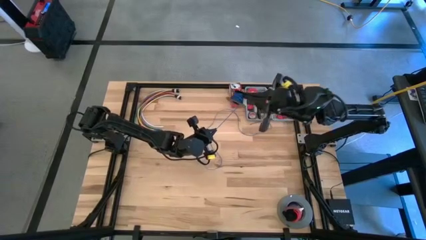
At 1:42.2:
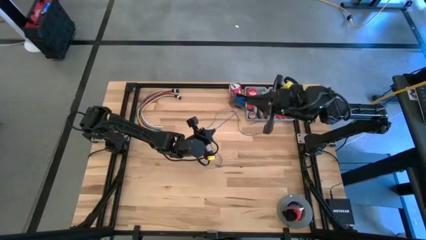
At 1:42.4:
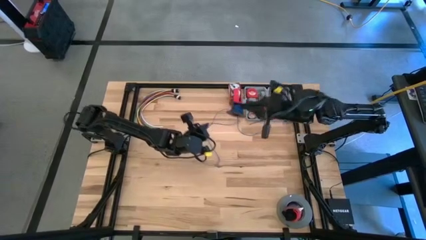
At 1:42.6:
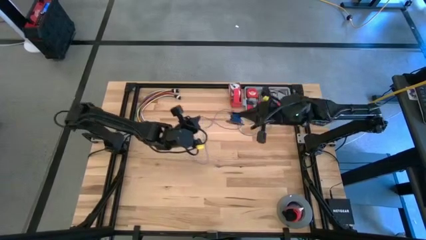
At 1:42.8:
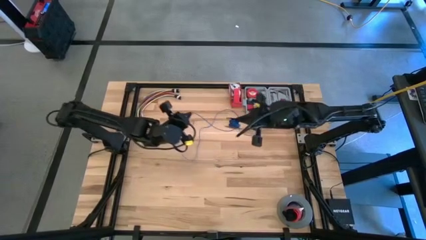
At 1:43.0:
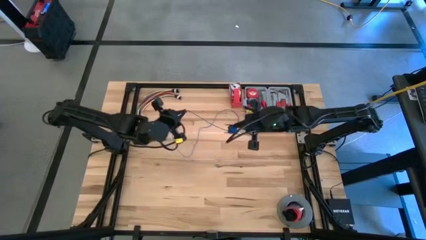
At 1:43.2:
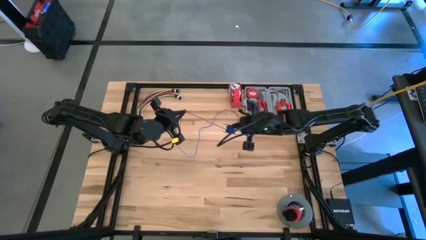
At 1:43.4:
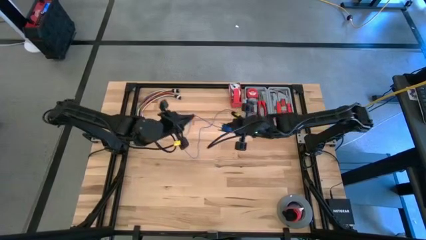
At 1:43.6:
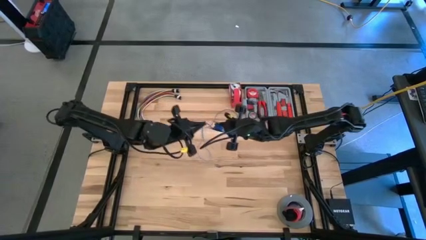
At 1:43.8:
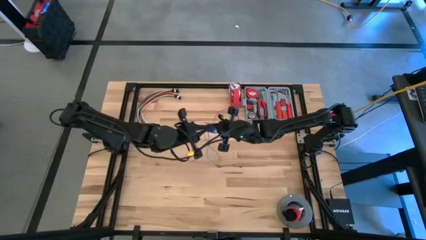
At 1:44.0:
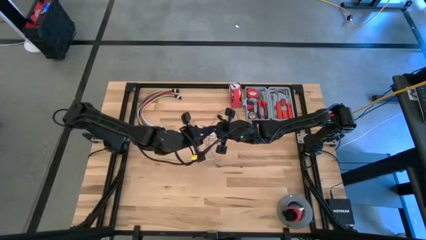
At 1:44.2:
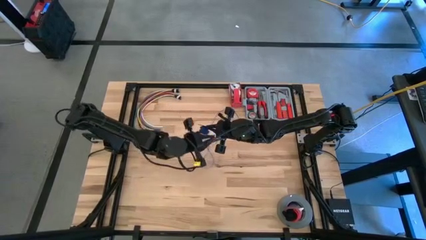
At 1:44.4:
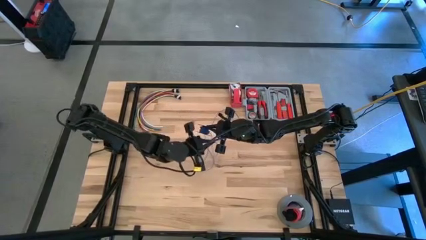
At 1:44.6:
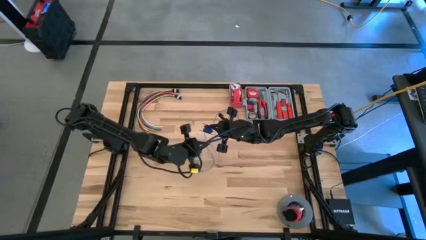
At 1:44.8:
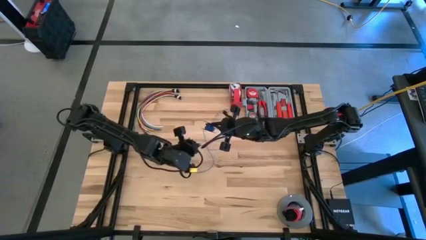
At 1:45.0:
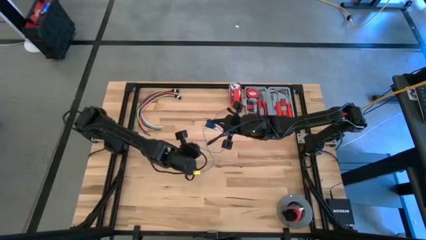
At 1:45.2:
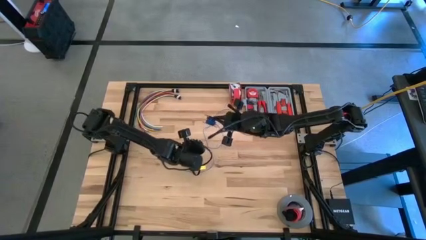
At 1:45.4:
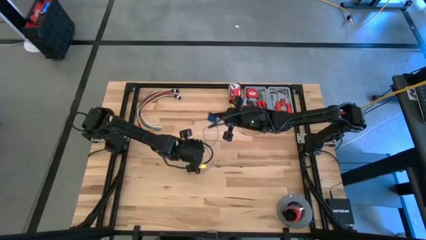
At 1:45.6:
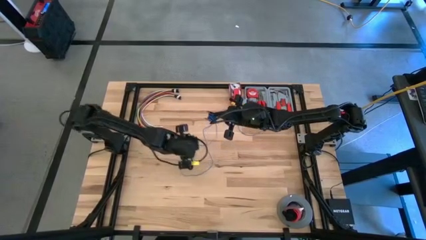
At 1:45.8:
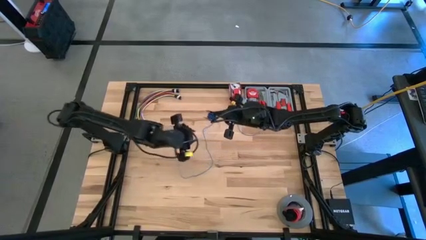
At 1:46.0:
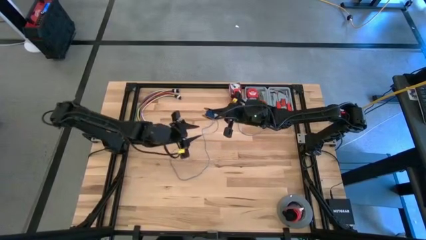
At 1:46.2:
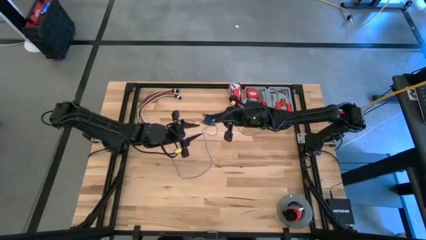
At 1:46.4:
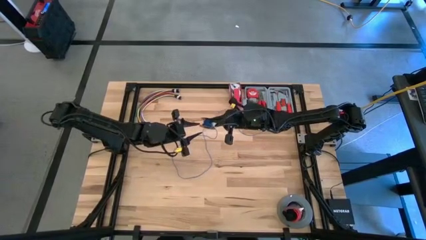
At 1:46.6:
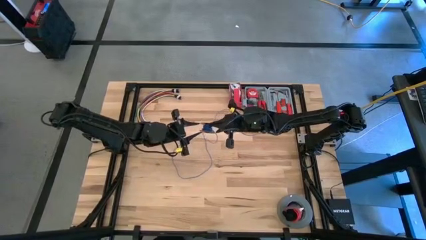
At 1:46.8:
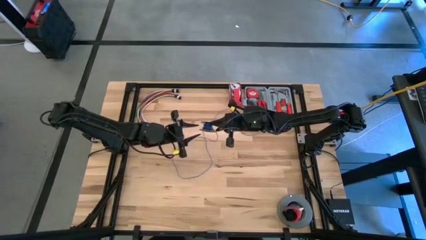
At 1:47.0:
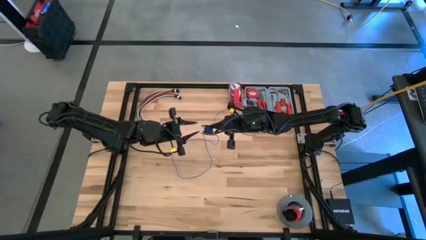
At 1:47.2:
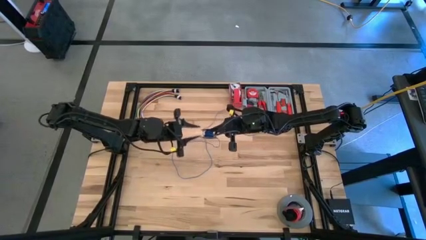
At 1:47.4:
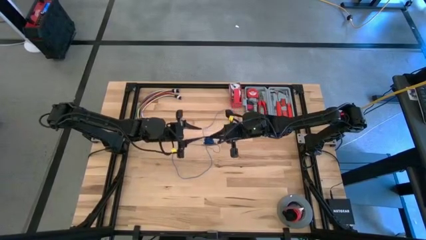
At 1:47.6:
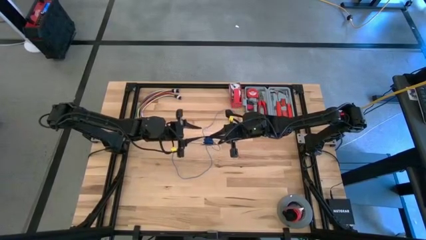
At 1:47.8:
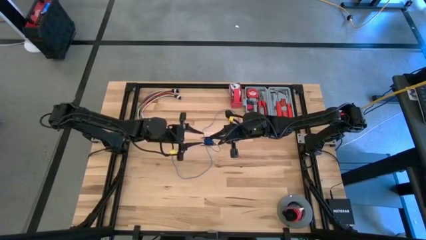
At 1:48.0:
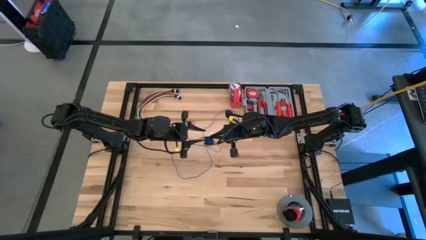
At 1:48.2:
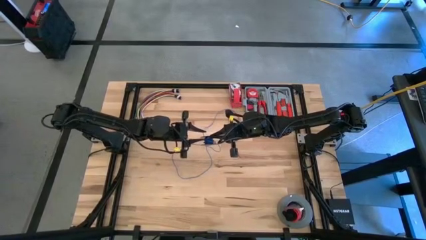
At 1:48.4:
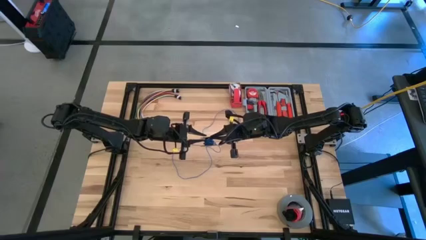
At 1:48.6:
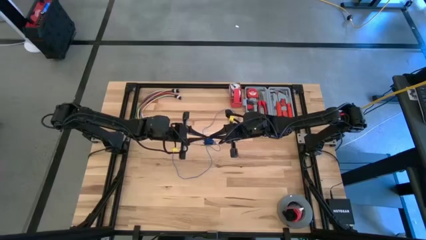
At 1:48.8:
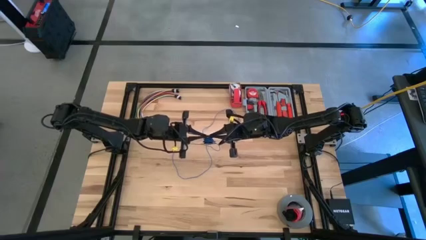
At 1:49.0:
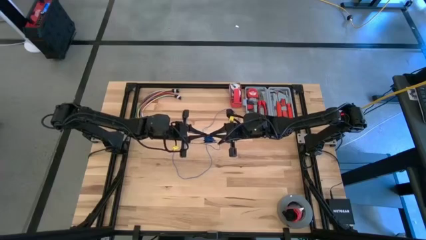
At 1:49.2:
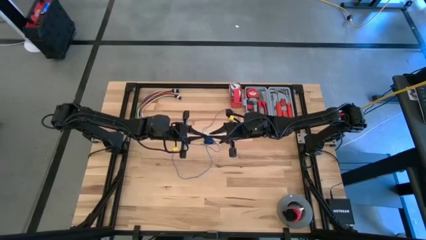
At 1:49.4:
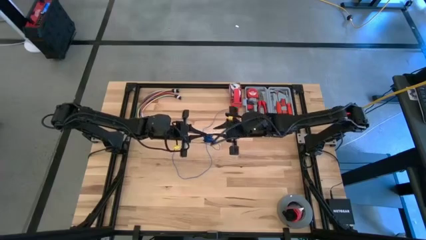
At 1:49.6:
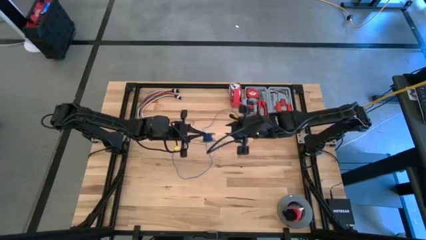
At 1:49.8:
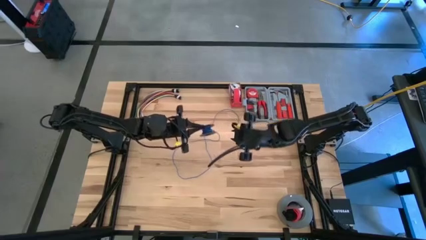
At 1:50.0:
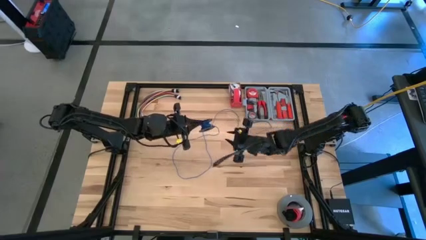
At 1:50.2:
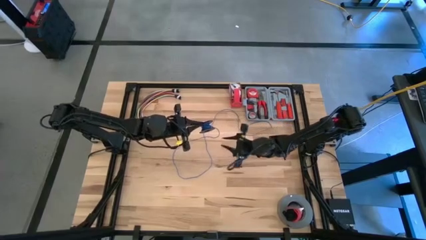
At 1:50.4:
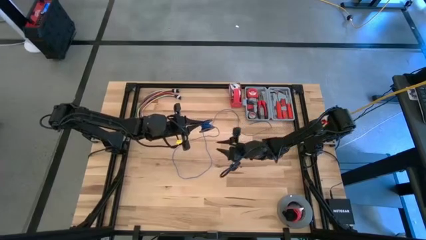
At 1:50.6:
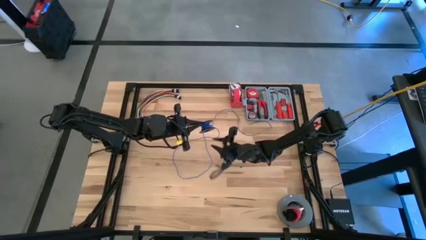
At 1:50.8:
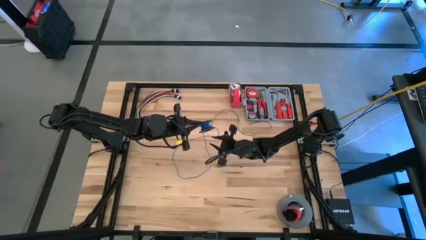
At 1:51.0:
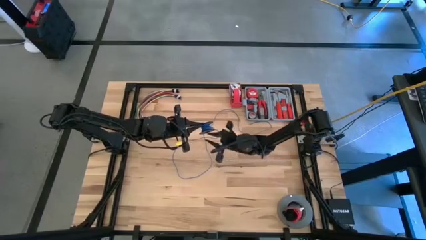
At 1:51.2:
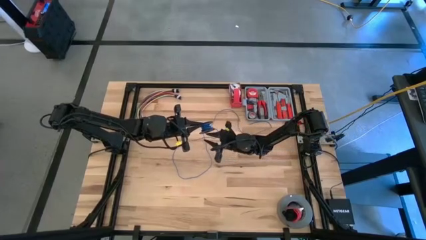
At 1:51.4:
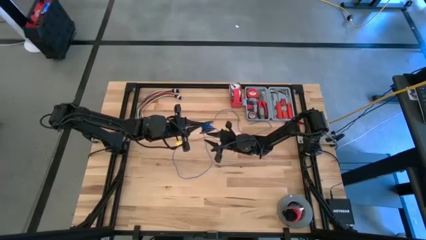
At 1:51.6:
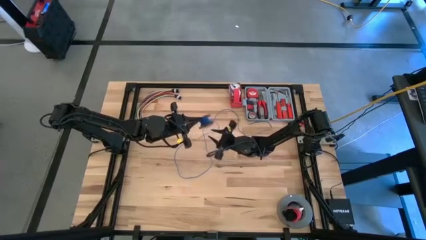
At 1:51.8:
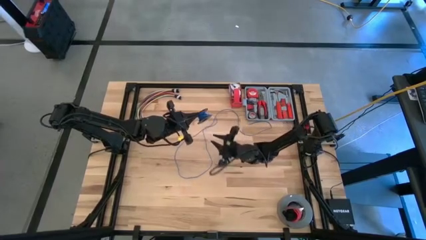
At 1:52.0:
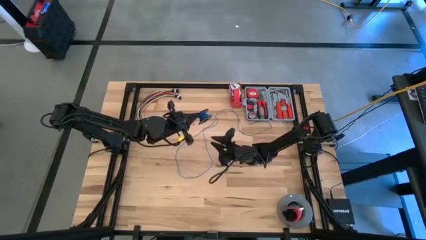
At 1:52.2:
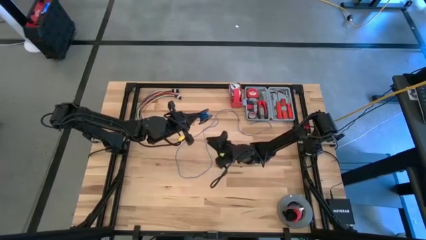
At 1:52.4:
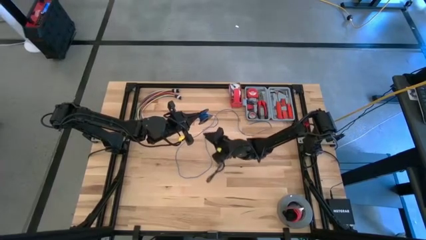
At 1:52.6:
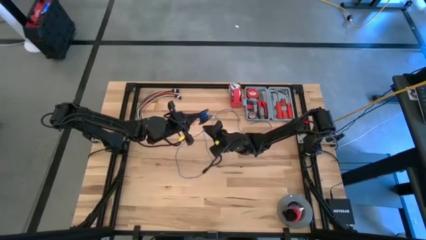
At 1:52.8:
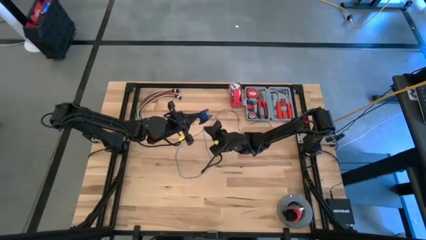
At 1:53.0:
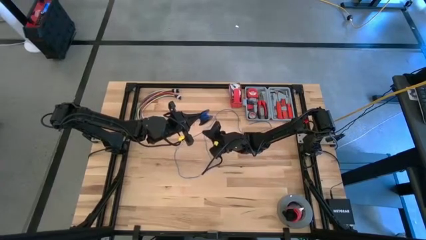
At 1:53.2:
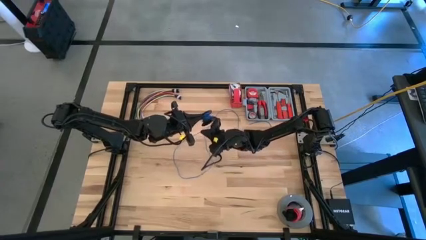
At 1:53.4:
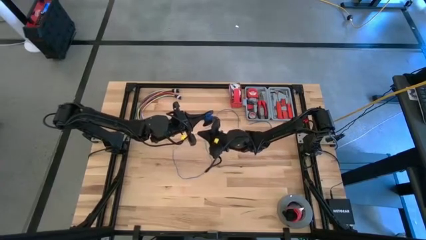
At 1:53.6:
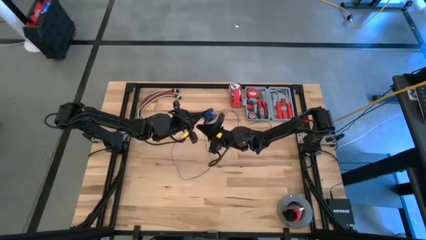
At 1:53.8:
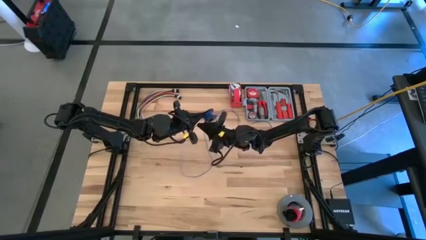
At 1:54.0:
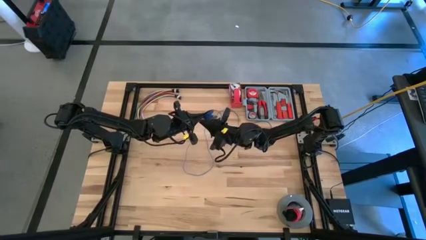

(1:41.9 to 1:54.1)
Task: Coil cords
Coil the blue wire on the black spool

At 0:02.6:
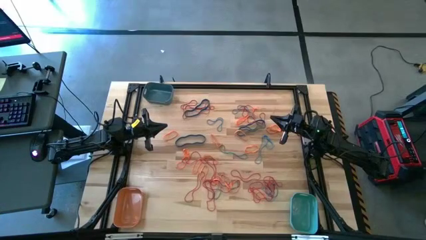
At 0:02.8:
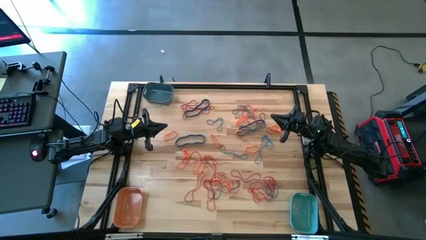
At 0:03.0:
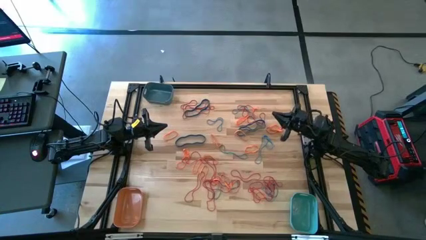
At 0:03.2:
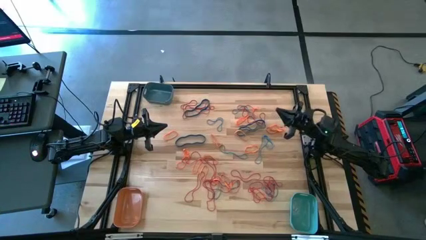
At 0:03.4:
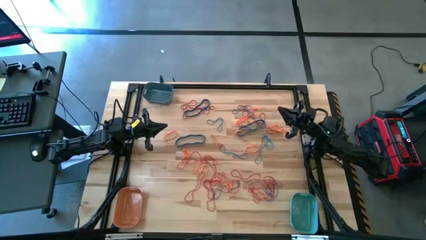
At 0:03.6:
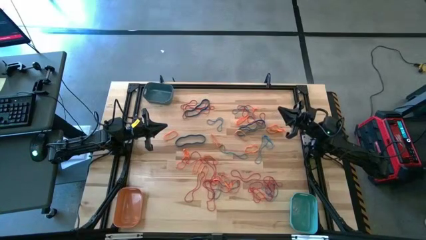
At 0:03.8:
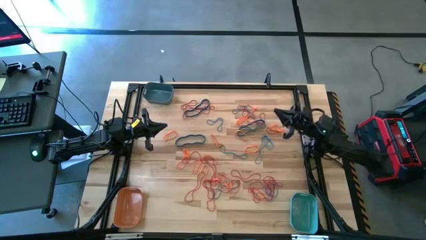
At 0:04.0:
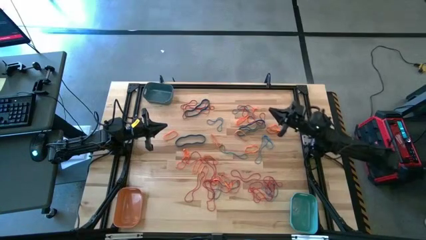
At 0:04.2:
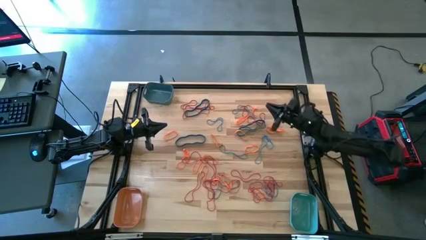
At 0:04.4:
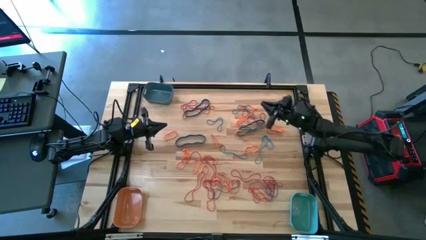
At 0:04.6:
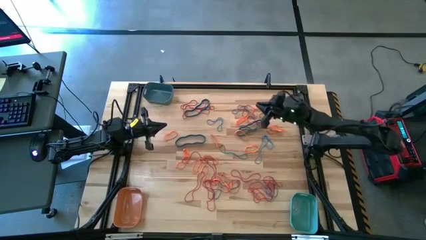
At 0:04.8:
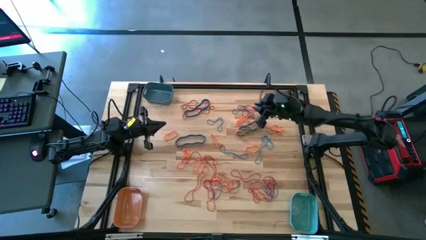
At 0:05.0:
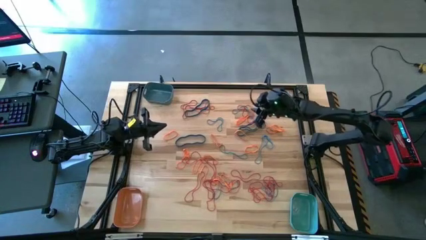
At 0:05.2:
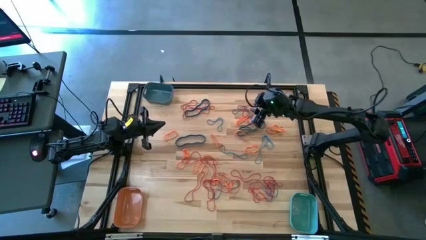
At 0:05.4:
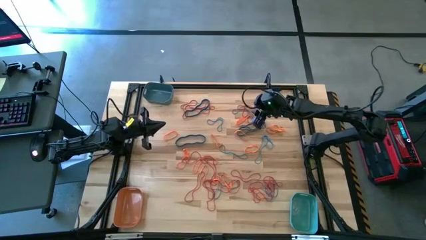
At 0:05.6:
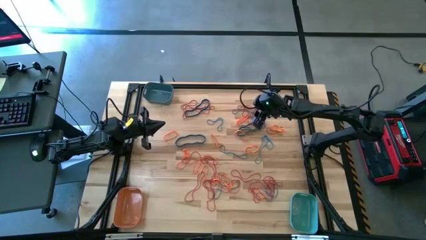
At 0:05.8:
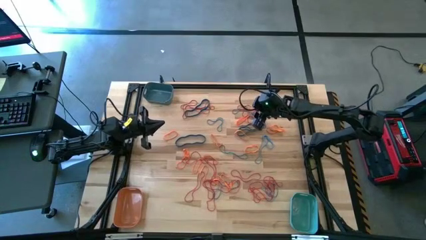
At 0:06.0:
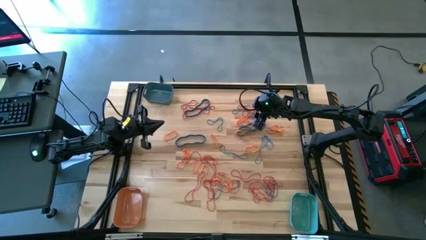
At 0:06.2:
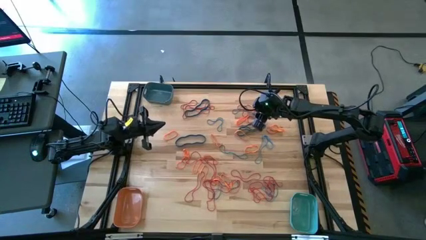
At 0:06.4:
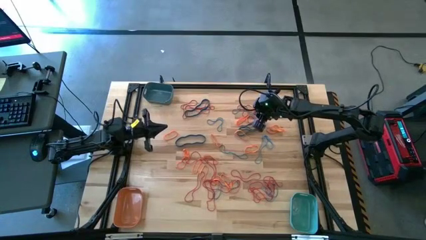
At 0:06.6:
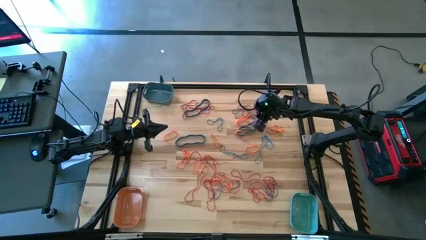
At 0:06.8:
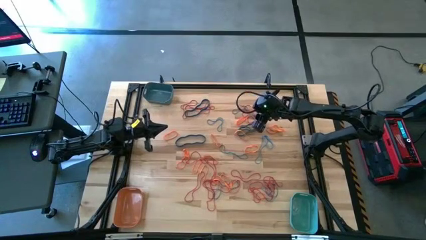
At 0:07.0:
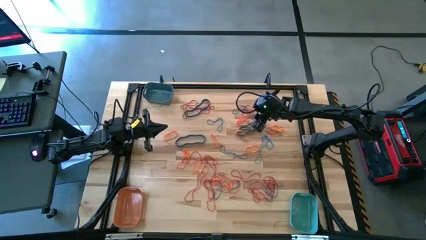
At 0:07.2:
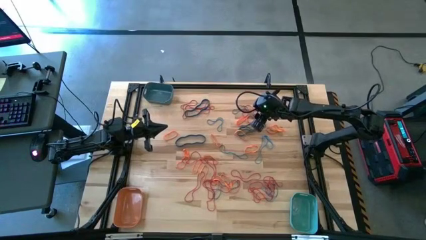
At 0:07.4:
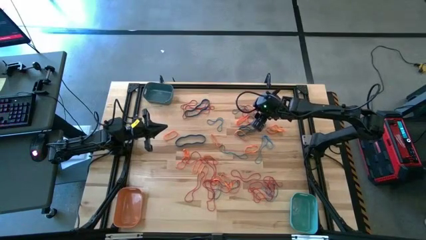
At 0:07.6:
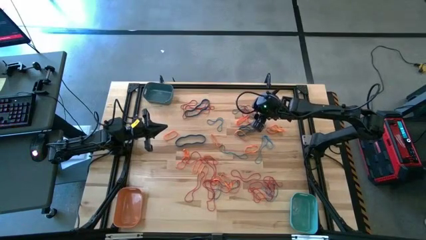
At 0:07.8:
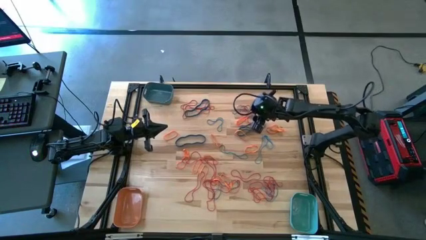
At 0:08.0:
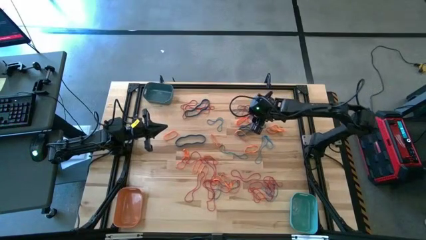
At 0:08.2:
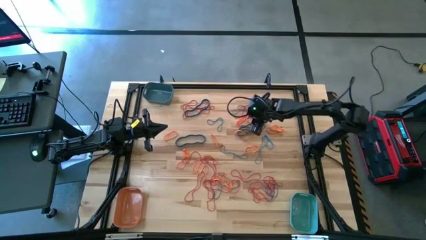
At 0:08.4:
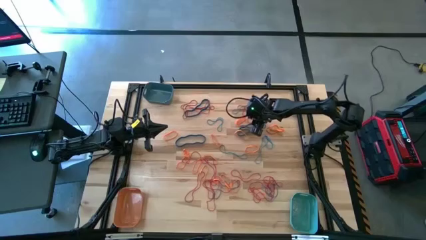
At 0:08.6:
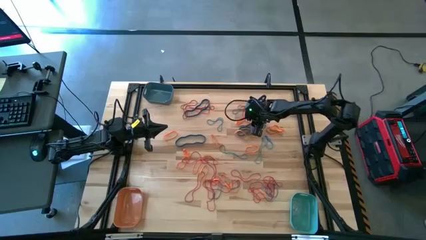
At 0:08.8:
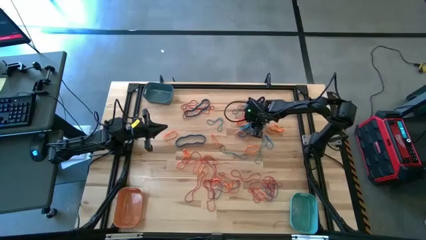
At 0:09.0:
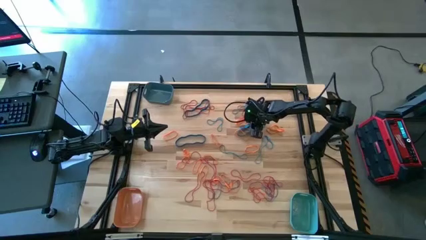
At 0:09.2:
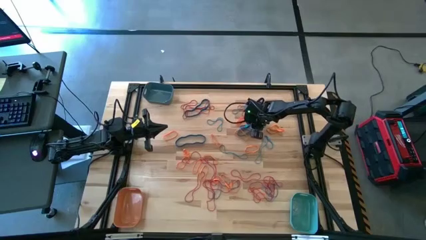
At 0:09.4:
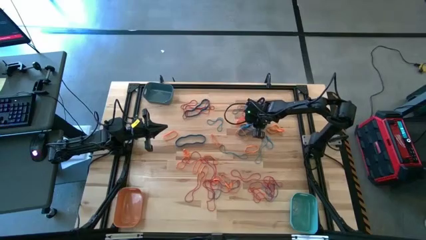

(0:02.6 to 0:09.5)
Task: Sort rubber bands into baskets
Put the blue rubber band into the light blue bin
